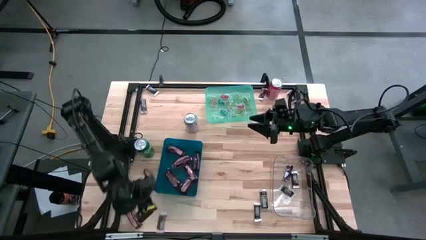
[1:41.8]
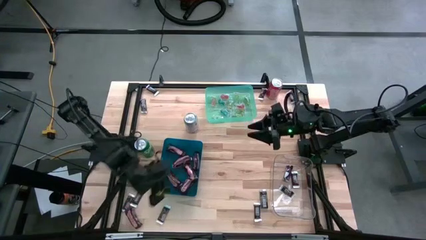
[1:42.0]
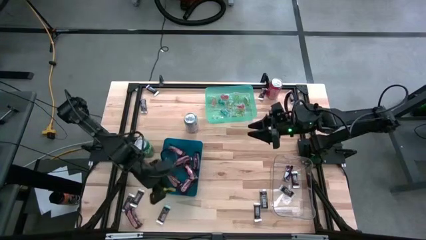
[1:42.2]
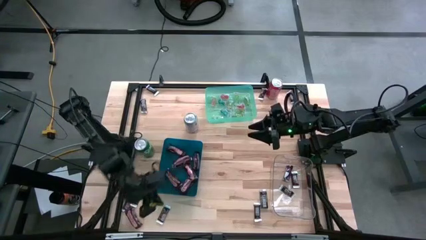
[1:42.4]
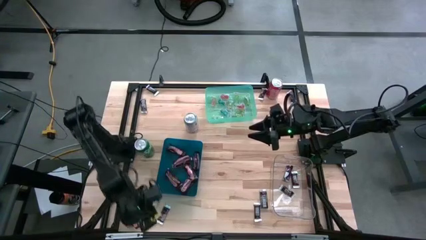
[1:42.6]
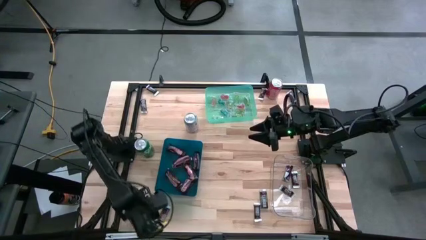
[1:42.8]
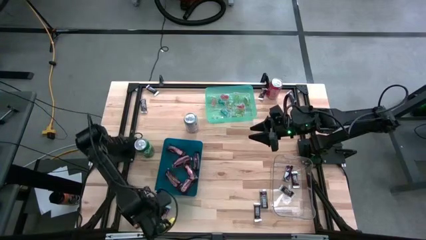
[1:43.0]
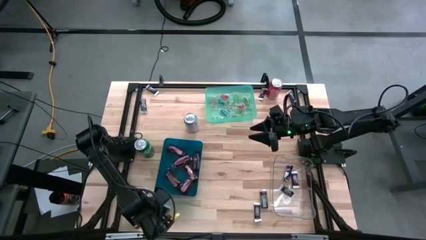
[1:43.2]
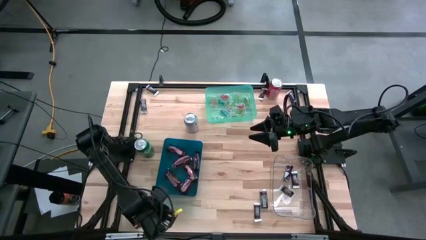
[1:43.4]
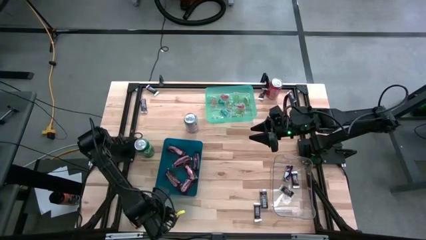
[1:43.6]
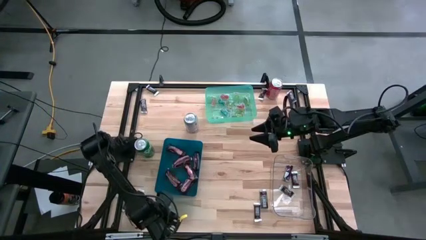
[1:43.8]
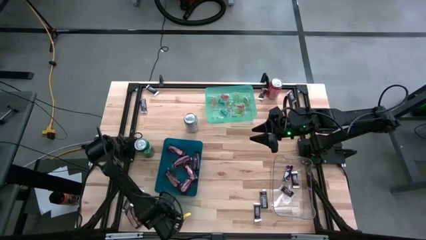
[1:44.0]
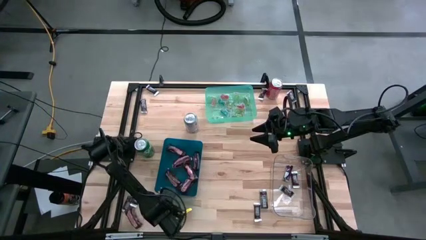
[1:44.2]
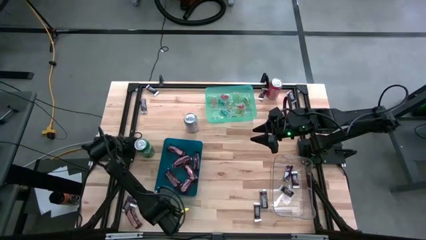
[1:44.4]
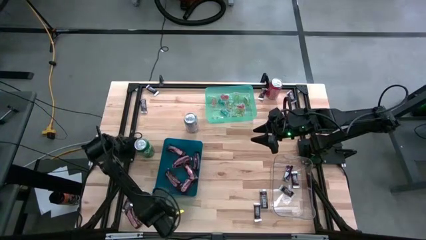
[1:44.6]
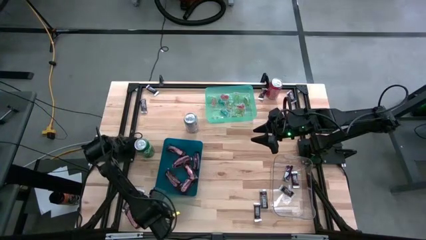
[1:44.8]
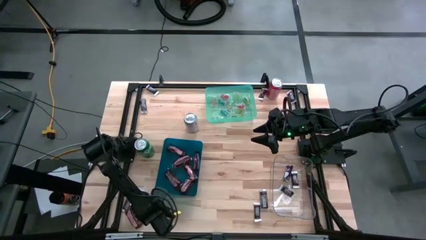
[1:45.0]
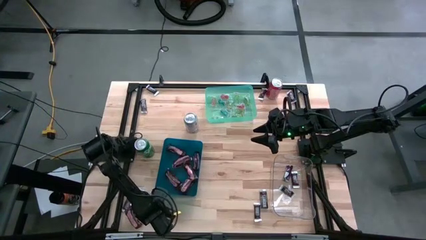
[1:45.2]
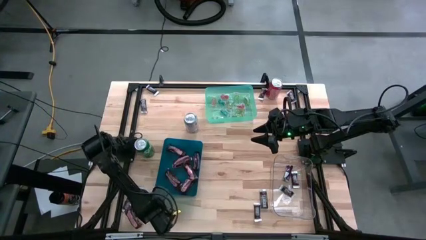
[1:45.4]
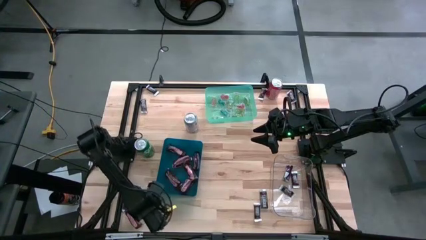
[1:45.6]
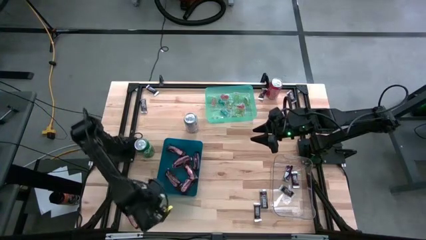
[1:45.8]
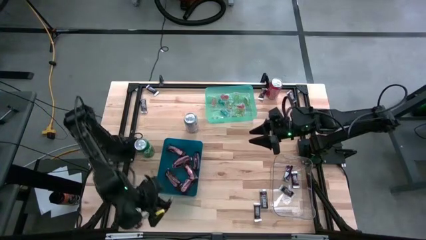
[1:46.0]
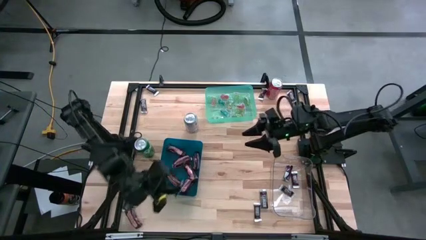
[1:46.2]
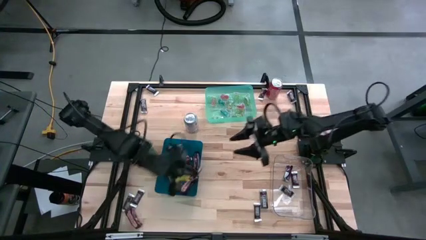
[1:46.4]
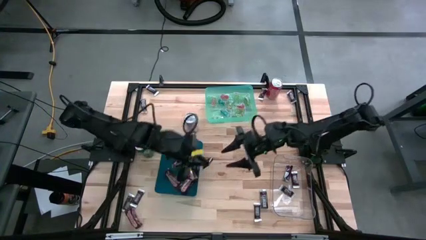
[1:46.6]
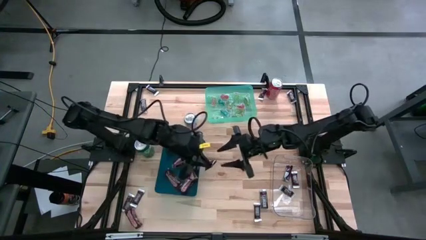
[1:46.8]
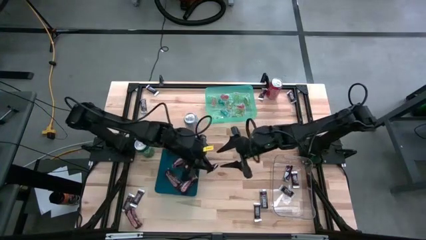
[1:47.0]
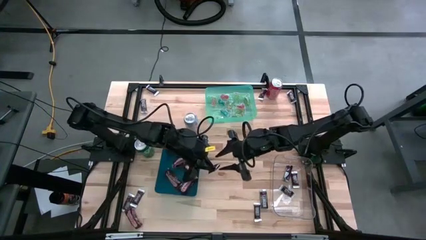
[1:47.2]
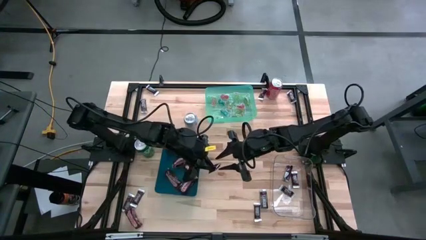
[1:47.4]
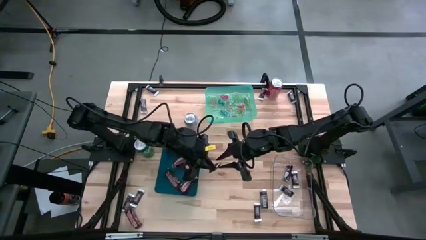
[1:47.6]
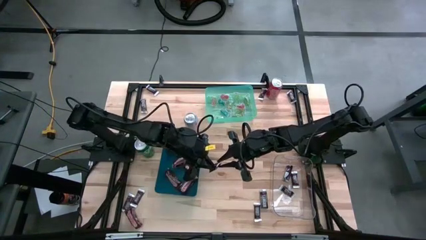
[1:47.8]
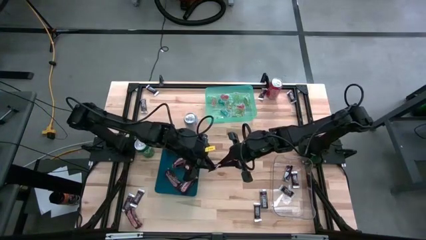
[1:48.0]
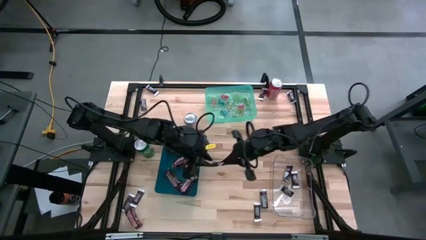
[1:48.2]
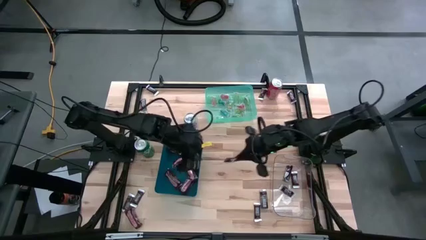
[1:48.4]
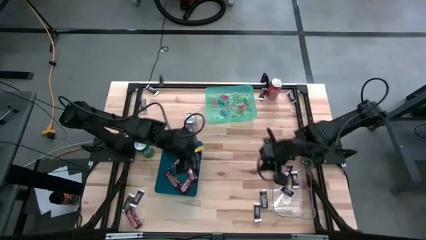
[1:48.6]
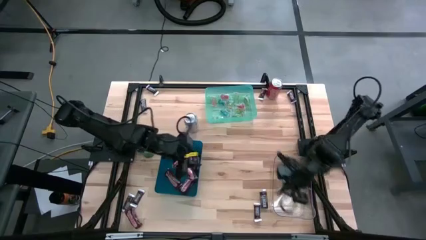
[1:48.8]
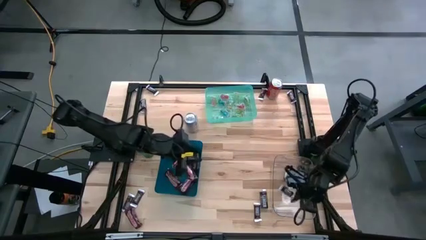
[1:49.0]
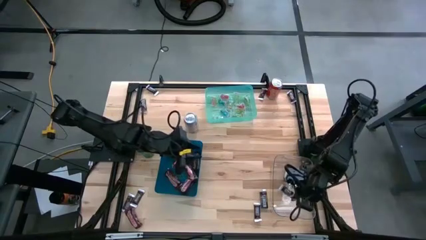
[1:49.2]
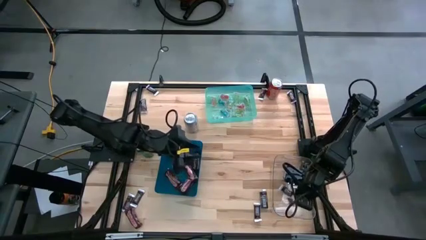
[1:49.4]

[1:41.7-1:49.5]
Task: Organize candy in baskets
Put the dark brown chocolate bar into the transparent bin

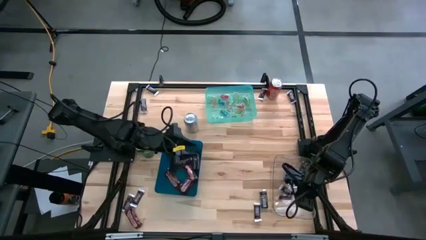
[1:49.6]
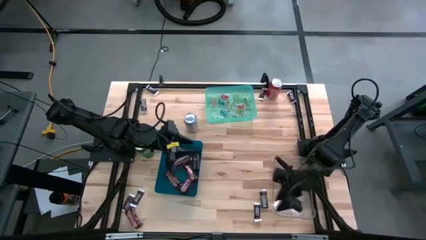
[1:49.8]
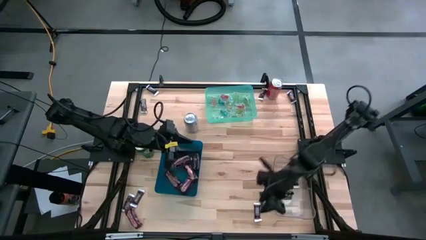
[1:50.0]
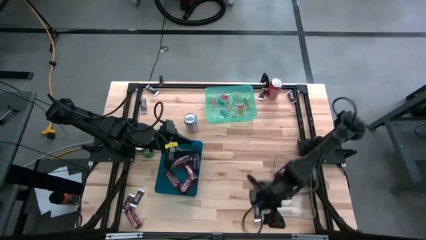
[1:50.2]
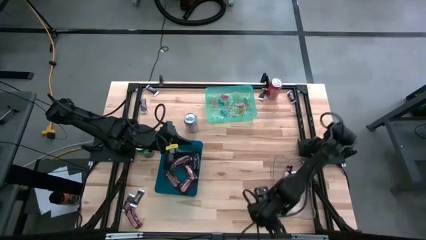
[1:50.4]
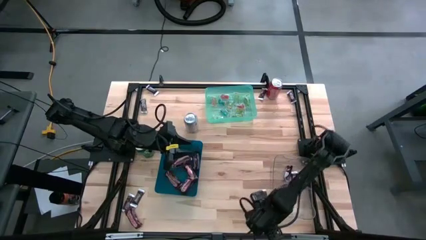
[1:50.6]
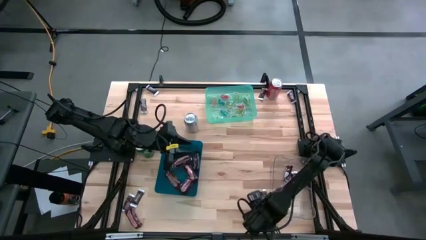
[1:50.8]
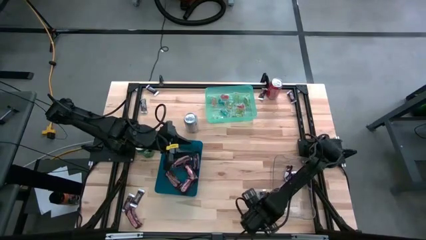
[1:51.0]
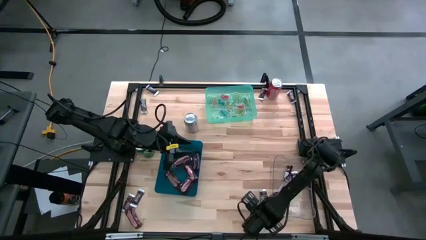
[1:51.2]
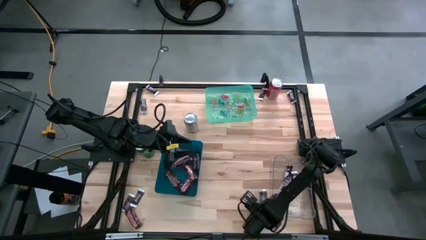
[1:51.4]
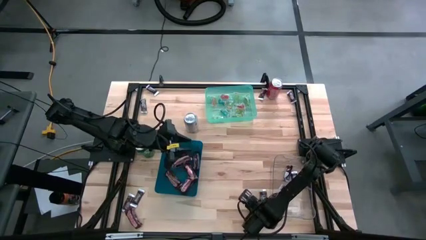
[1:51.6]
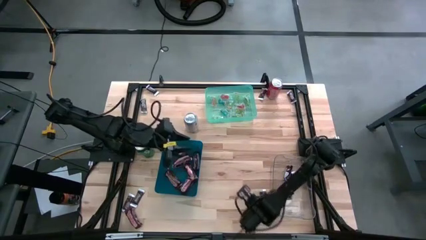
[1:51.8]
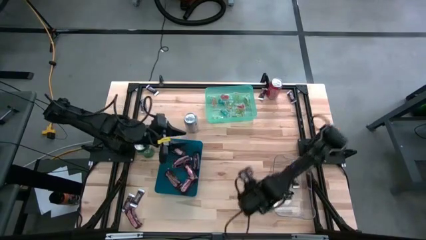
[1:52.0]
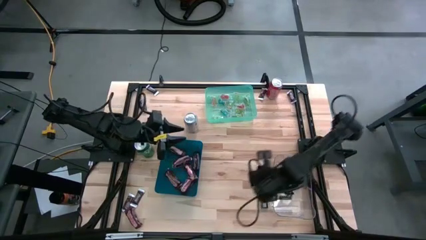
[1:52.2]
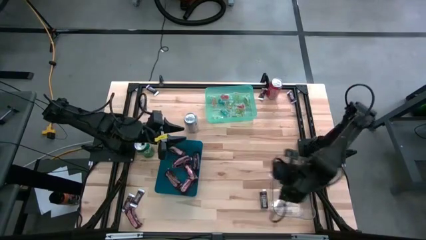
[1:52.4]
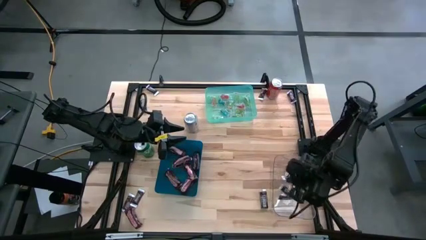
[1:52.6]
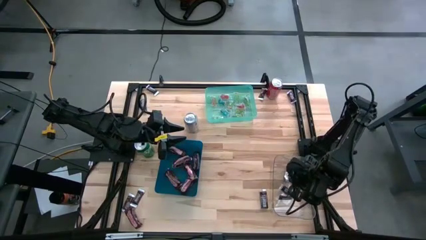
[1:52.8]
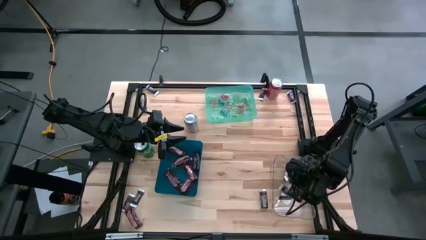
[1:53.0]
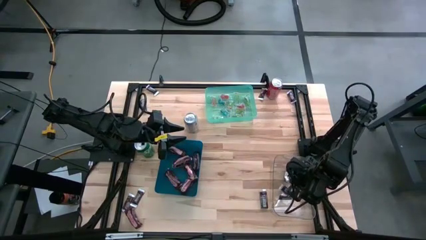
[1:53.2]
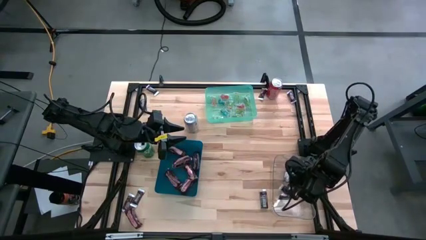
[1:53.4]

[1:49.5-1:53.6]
Put the dark brown chocolate bar into the transparent bin

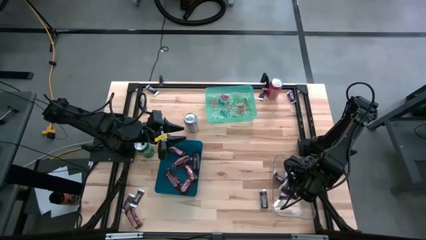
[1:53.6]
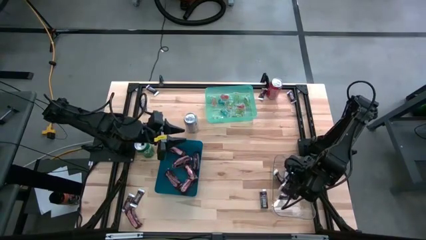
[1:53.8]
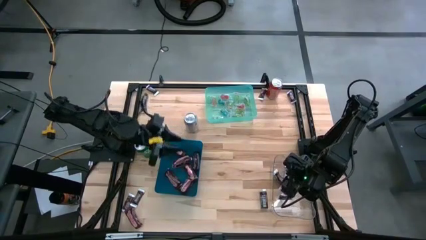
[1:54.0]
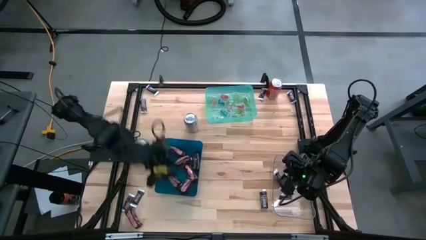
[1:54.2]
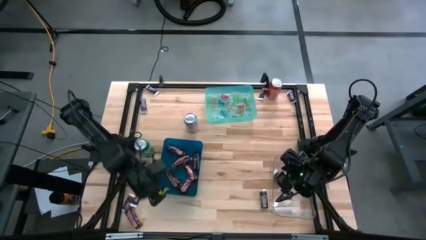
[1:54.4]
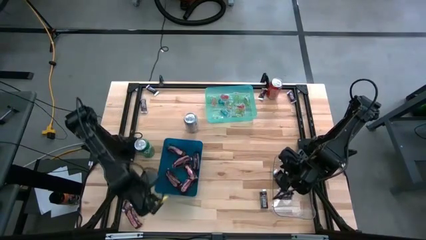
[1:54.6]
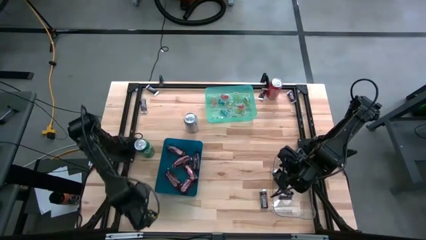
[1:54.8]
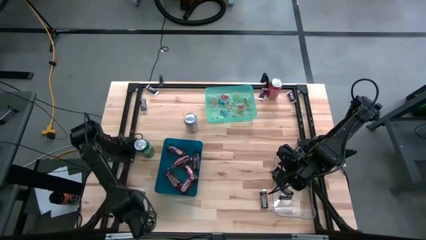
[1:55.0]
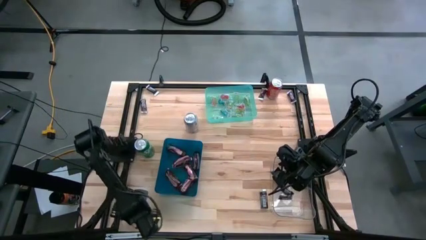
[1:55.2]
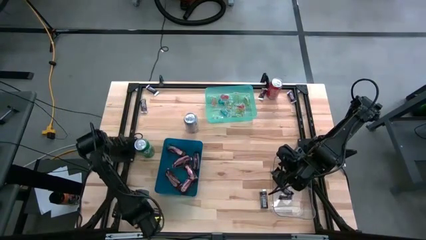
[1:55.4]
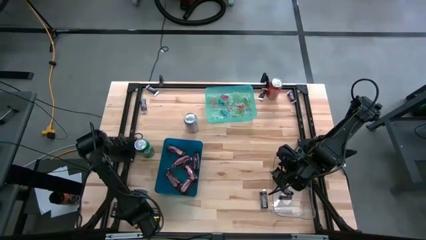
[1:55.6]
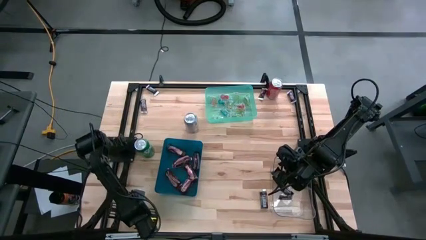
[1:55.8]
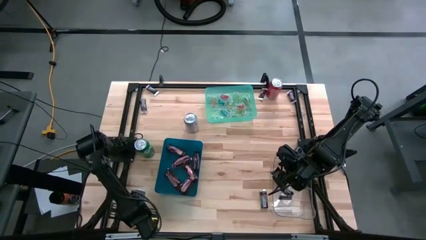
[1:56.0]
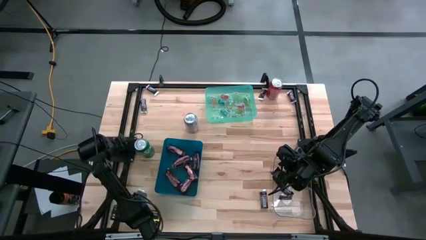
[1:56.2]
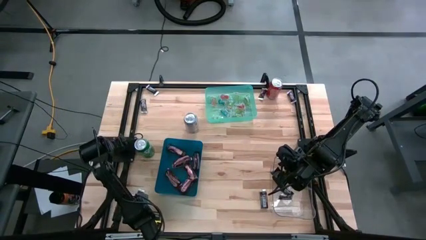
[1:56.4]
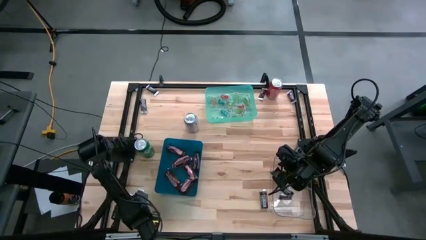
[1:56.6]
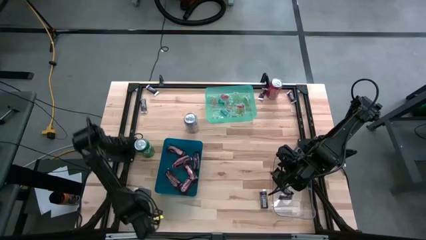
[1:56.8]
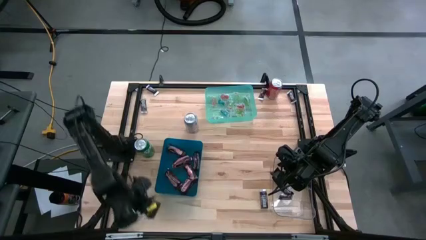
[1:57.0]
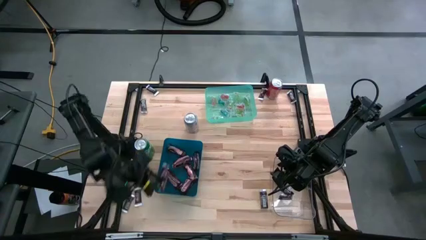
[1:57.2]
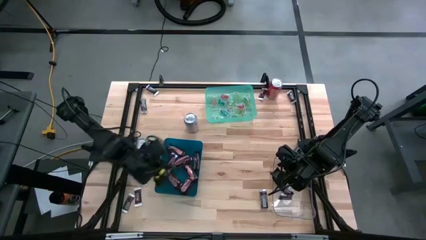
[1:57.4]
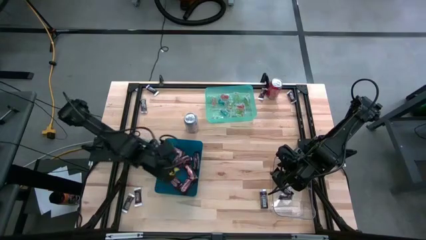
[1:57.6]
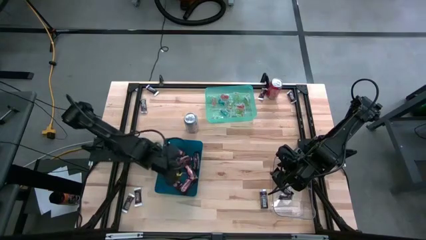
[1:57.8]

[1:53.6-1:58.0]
Put the brown chocolate into the blue bin
